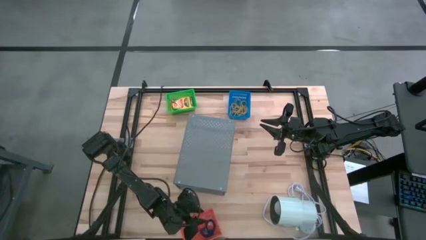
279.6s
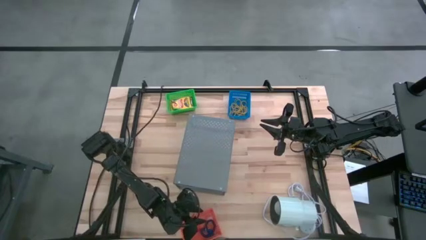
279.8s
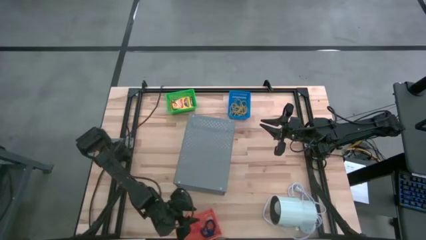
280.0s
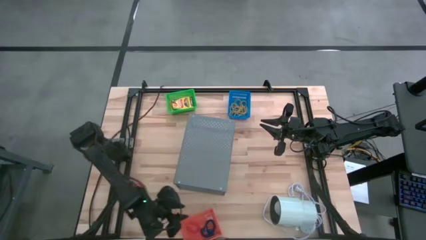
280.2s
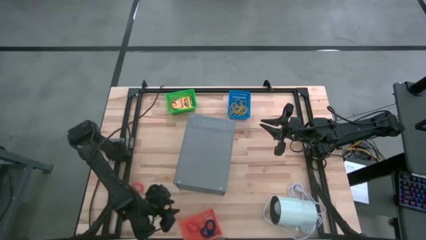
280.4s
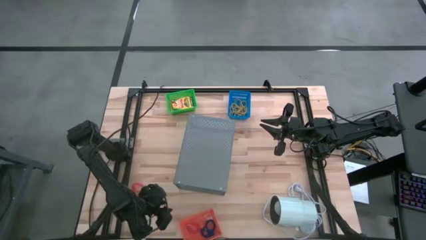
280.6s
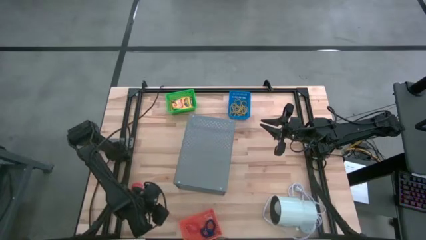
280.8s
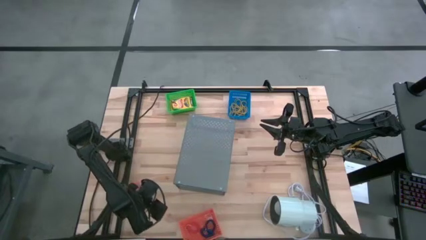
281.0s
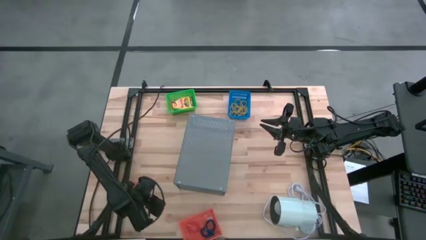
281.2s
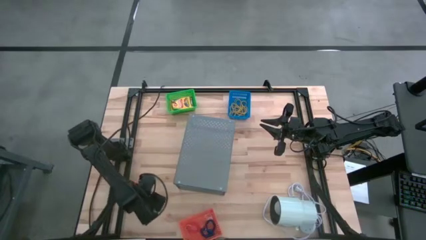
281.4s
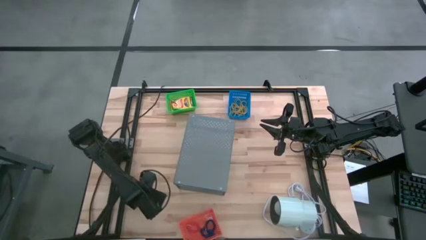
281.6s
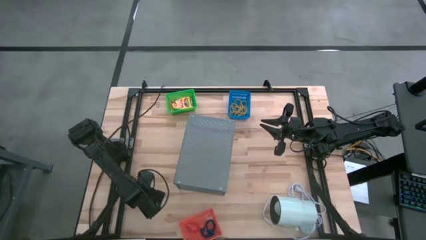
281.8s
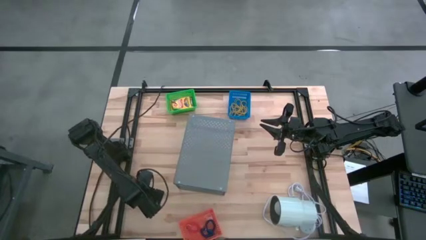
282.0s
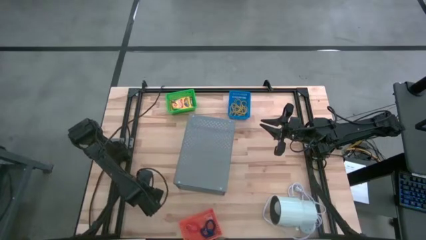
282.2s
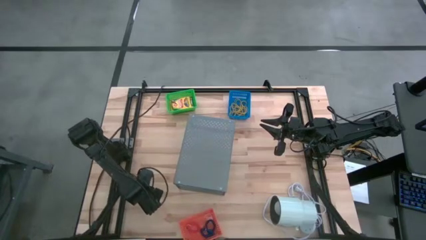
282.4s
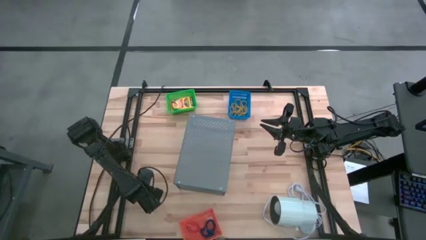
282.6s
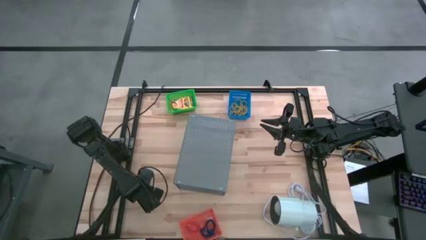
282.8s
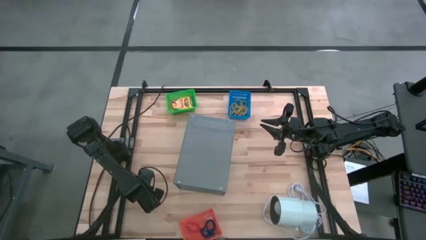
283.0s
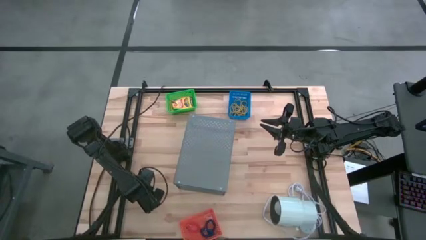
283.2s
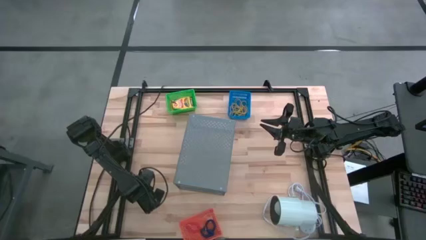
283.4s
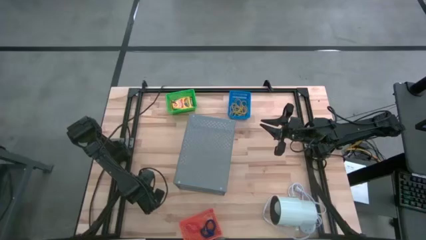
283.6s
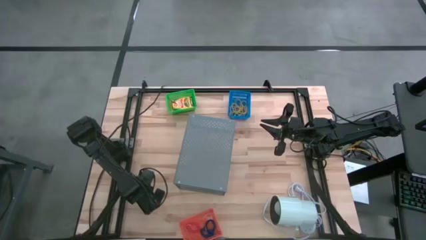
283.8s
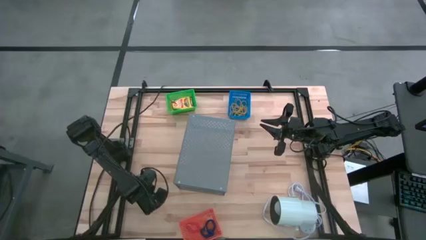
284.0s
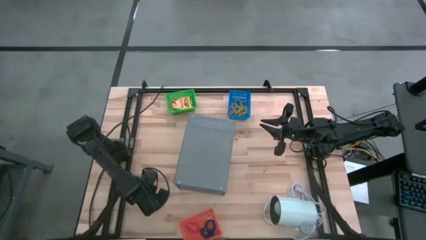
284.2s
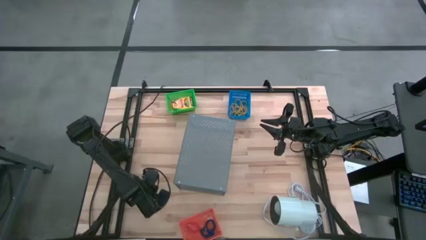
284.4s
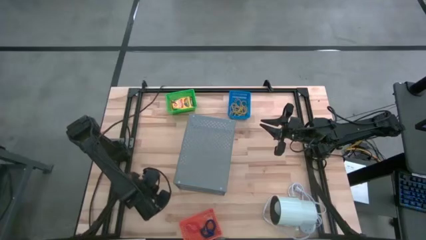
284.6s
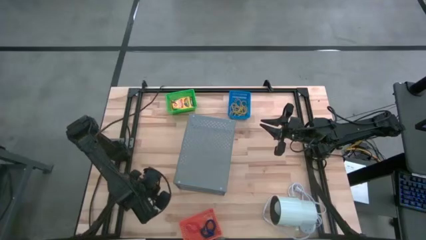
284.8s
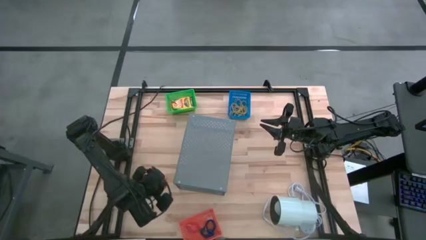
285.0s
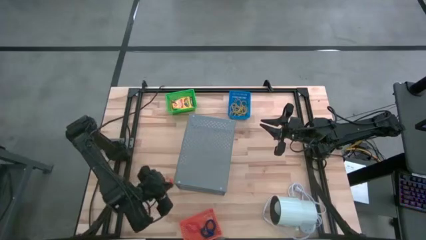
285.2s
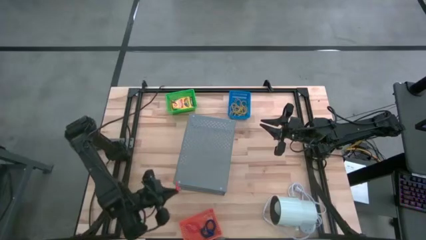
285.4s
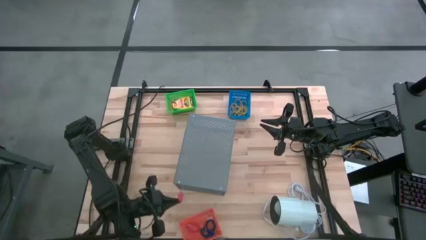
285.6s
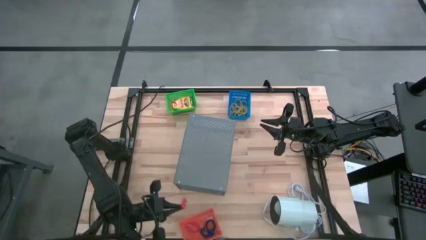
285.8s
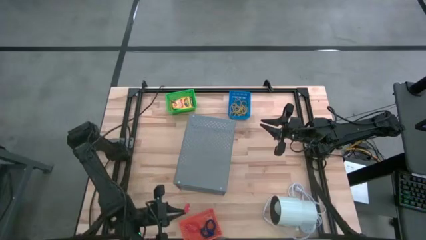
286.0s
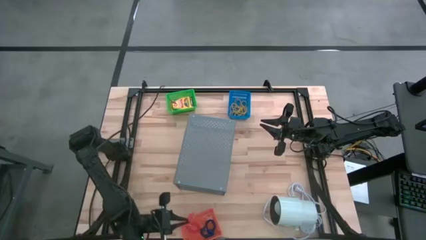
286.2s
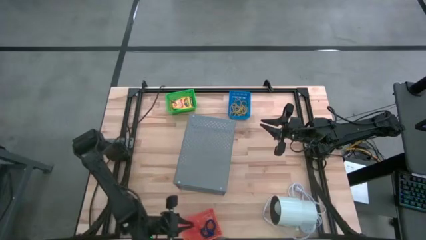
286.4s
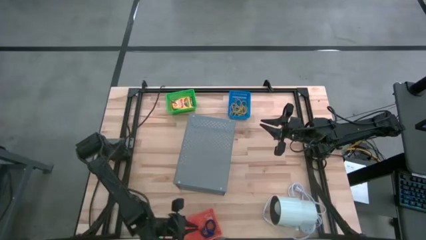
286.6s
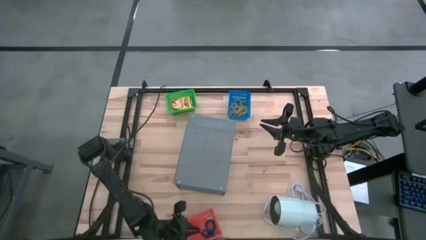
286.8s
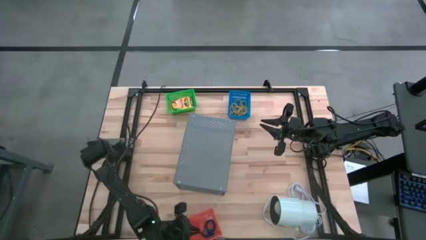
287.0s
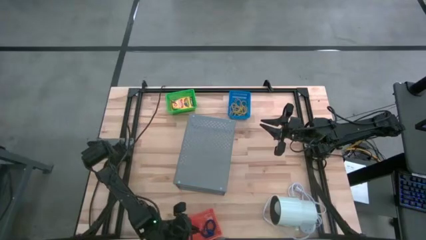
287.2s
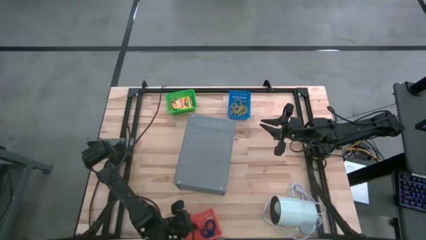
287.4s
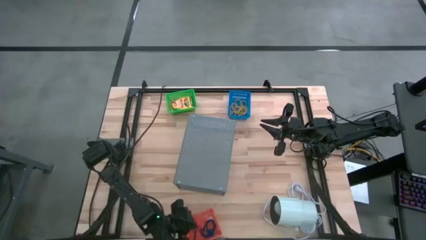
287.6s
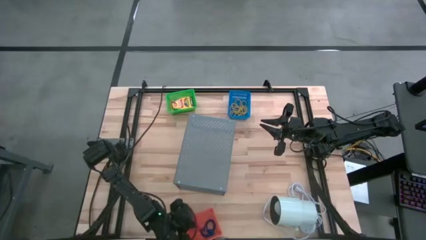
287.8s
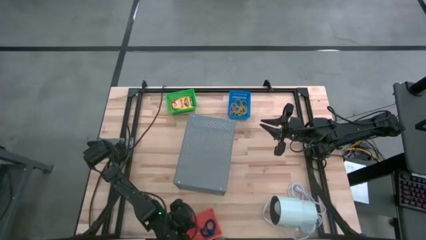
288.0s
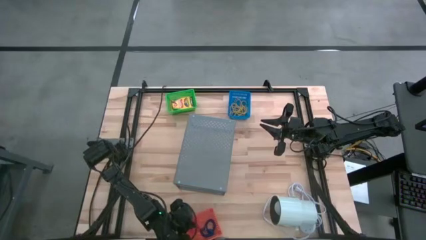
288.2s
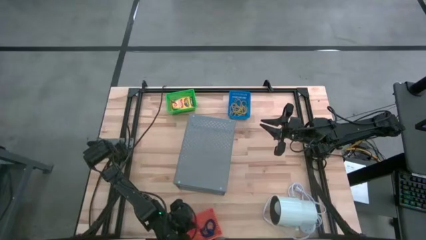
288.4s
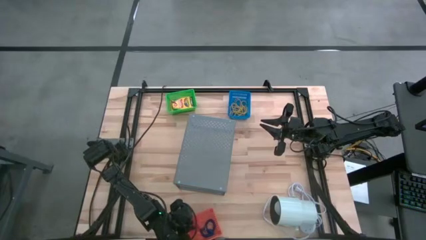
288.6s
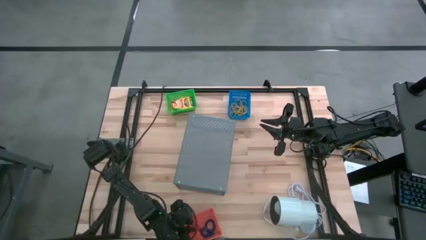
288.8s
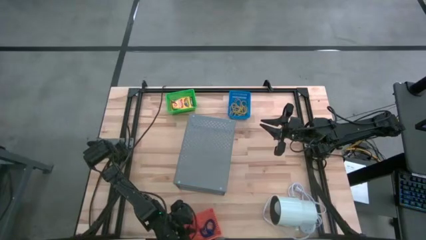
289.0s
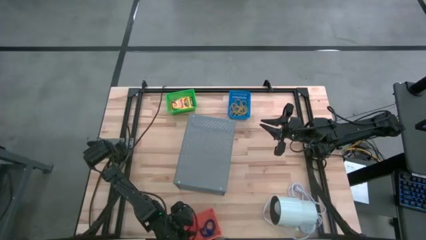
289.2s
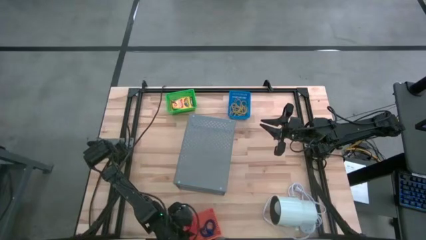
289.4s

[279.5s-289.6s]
Task: Pick & Place Office Desk Supplies
Put the orange spring keychain into the orange basket

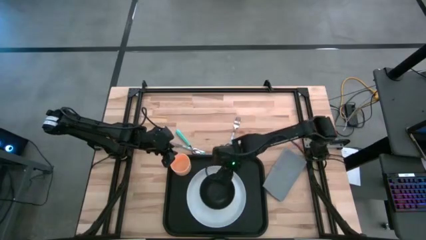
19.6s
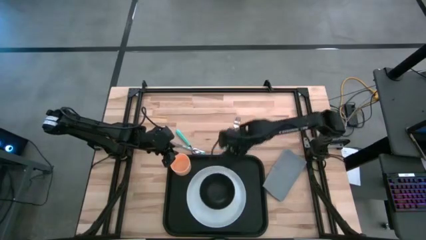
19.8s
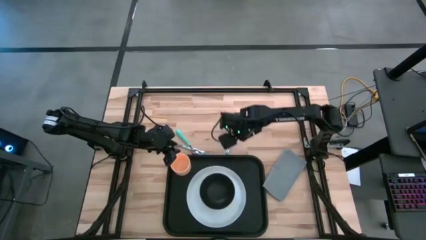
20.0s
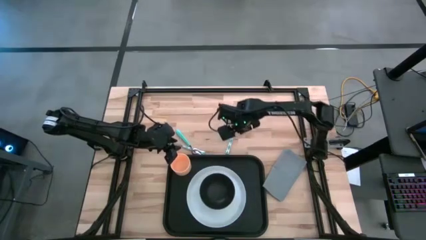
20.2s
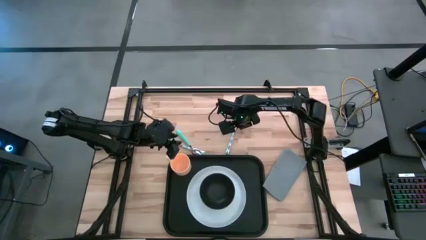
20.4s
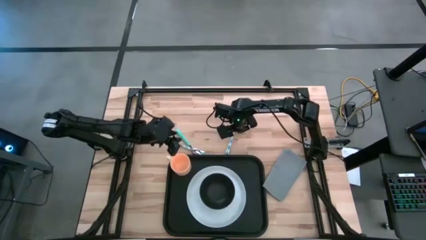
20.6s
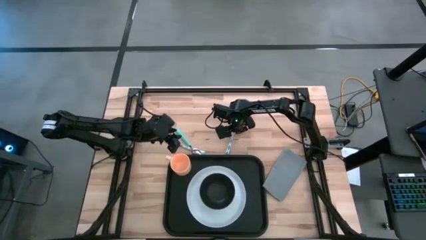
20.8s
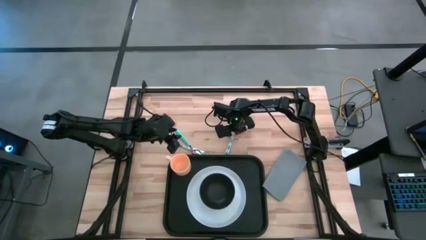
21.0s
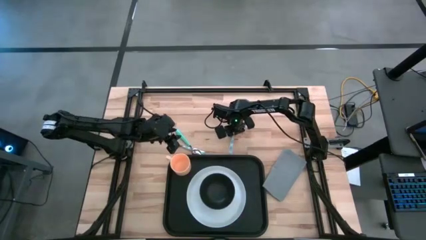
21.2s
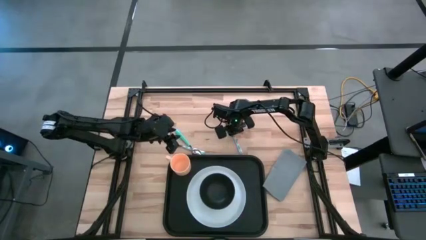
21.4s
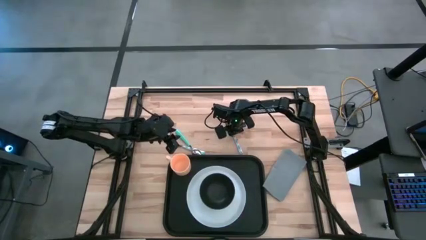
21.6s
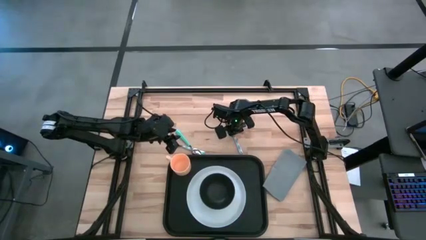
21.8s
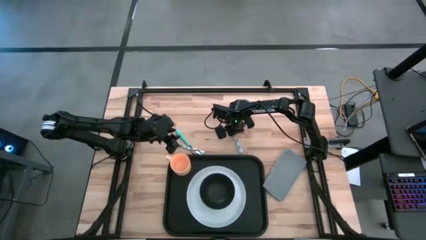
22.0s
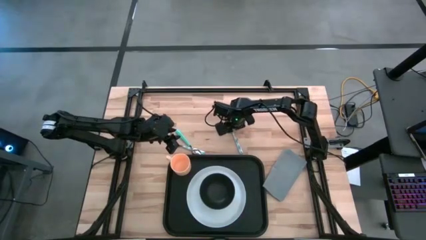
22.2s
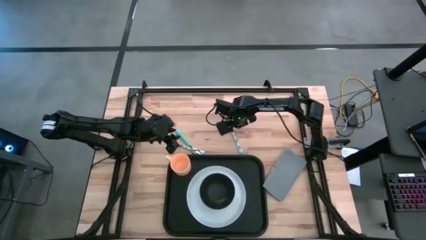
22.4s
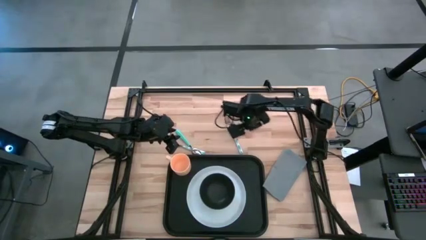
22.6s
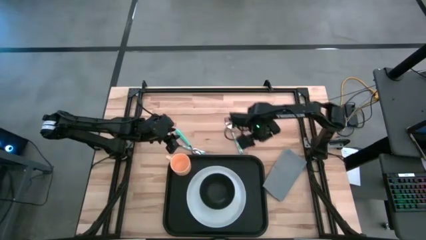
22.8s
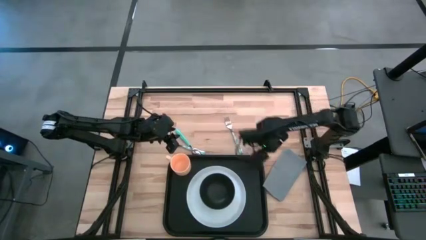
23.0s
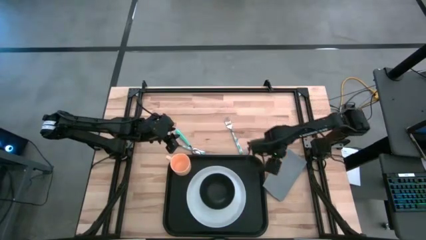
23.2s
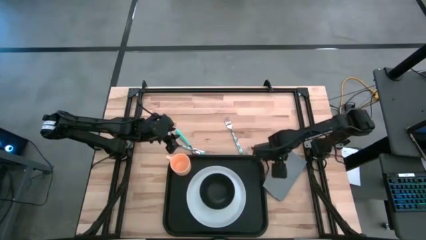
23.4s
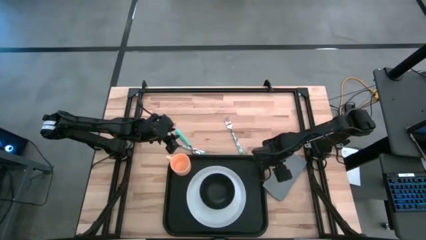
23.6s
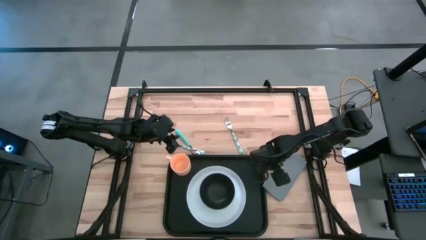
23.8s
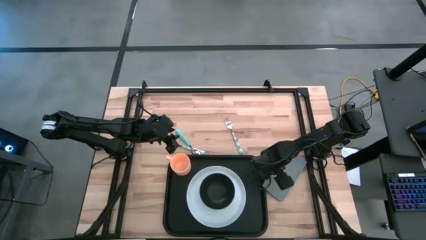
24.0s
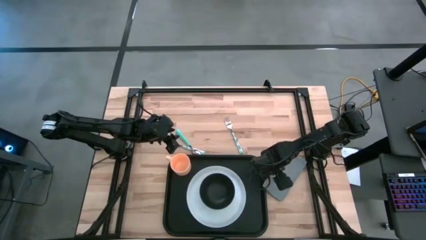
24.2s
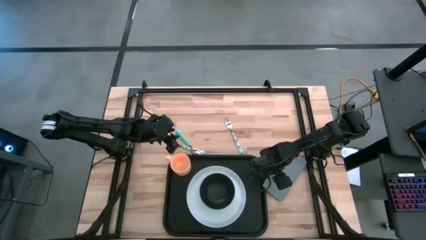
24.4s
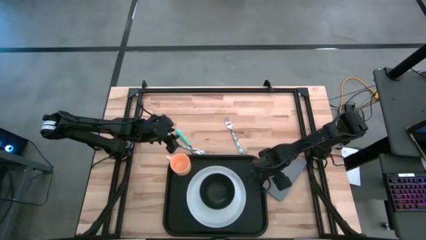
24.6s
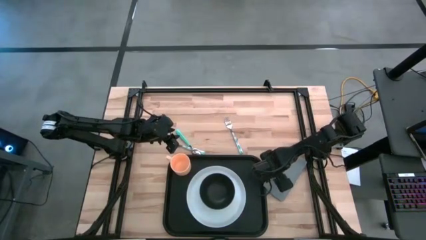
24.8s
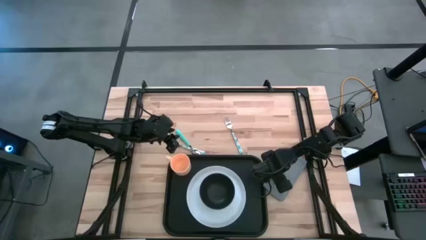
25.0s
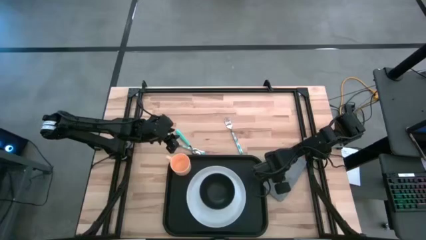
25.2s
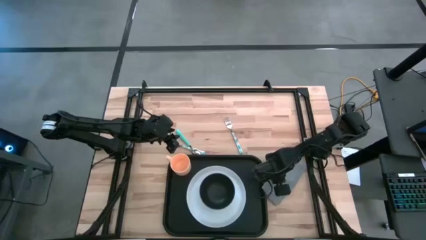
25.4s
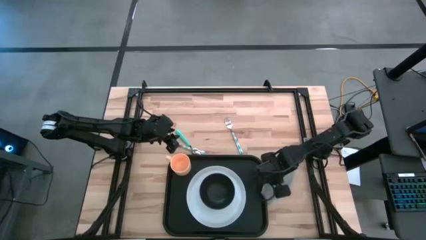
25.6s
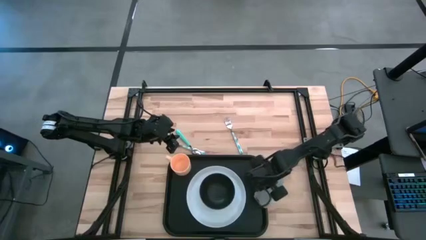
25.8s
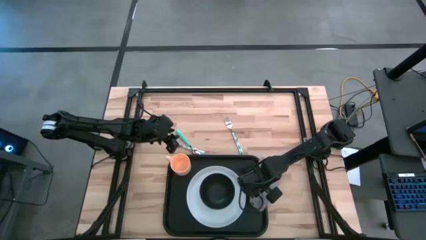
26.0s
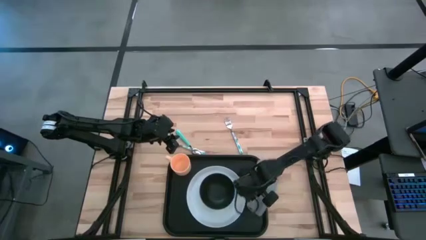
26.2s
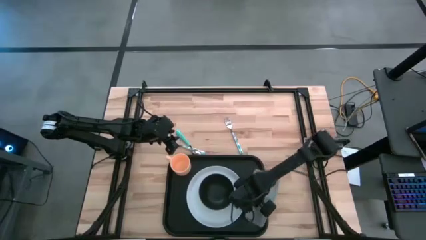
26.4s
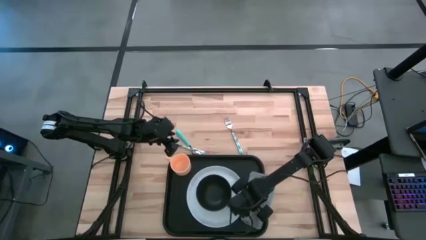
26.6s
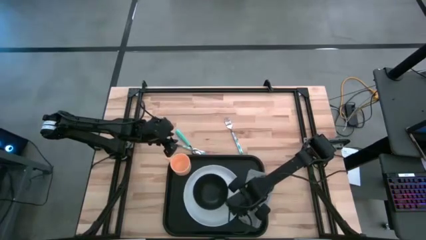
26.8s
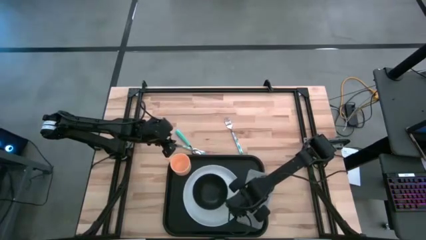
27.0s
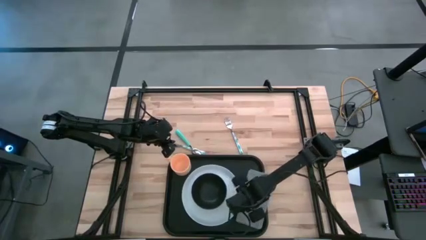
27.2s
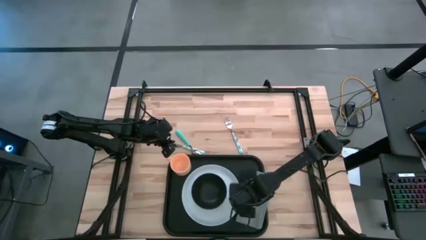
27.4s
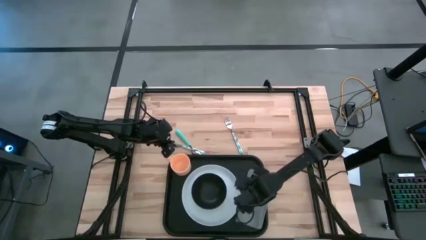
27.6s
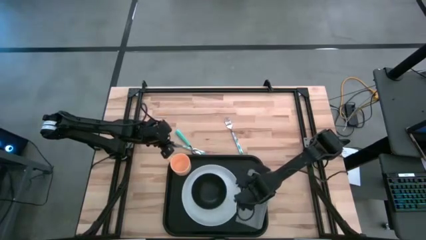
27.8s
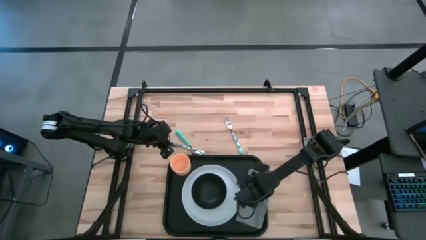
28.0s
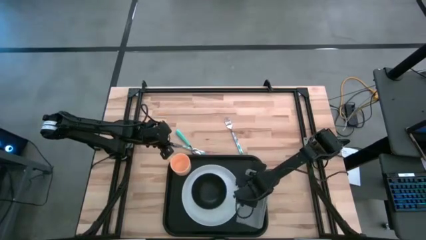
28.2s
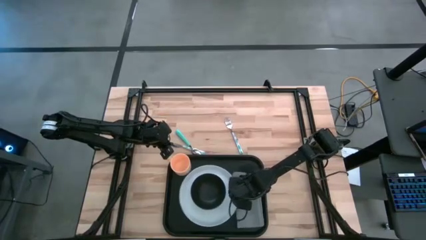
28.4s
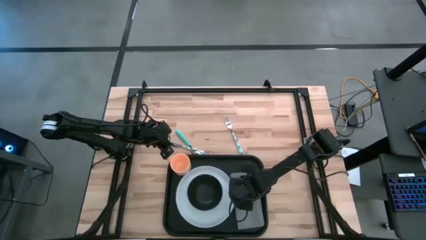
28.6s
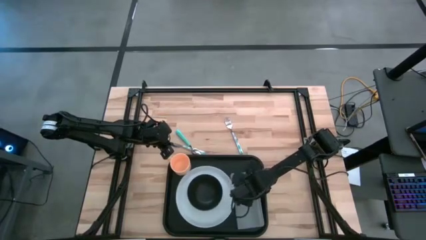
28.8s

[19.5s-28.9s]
Task: Set up tray
Put the gray napkin to the right of the white plate on the black tray
